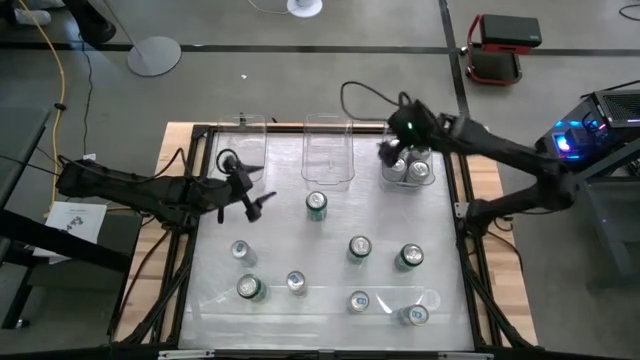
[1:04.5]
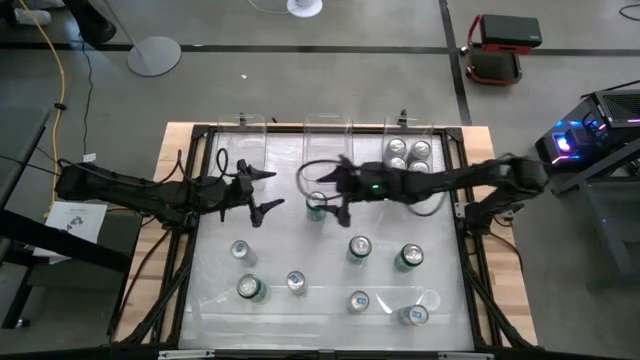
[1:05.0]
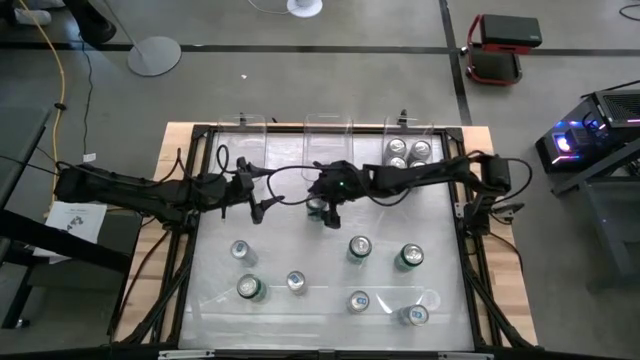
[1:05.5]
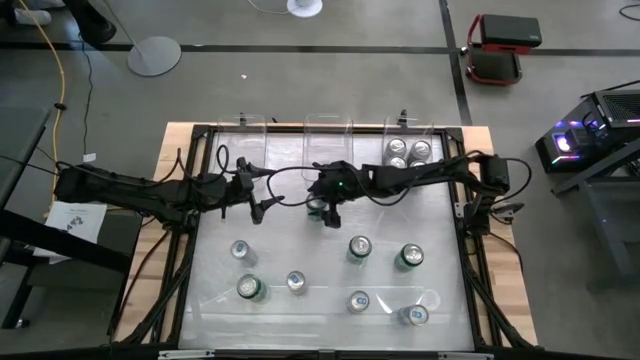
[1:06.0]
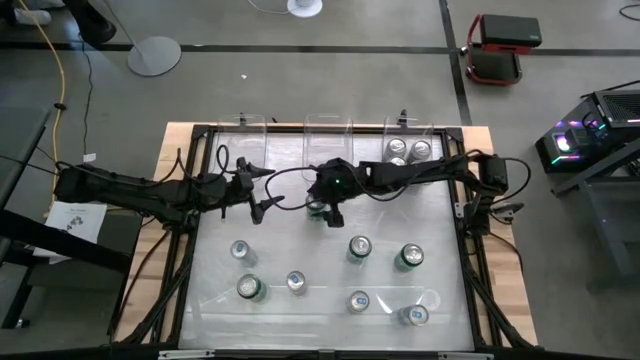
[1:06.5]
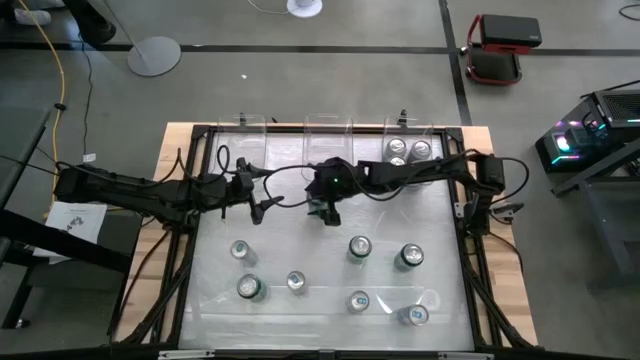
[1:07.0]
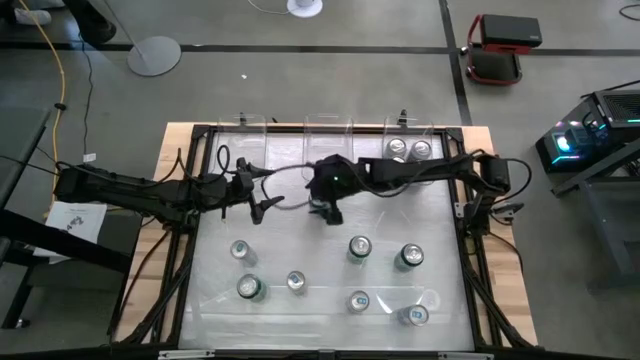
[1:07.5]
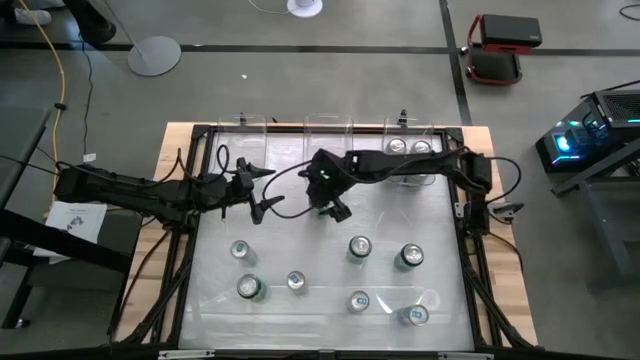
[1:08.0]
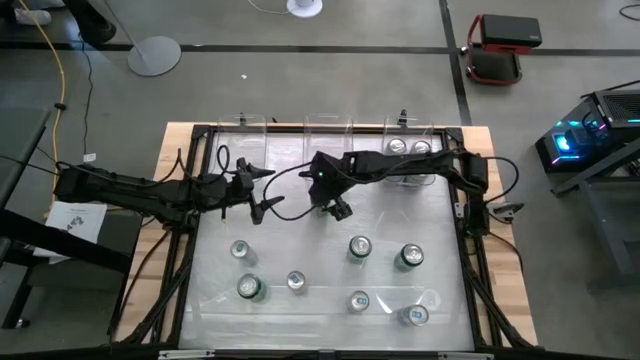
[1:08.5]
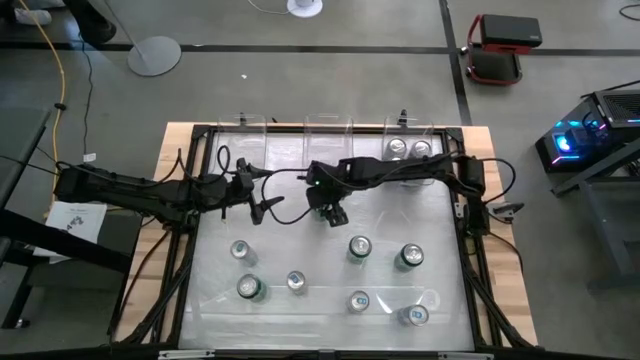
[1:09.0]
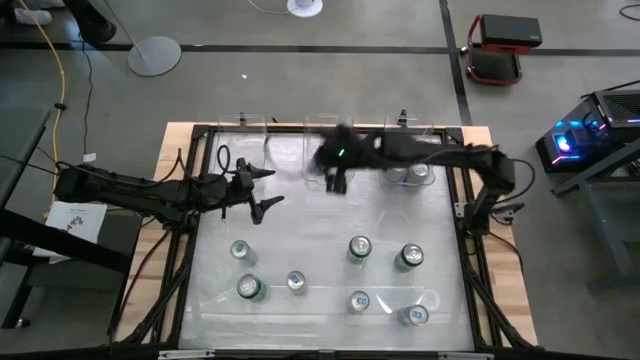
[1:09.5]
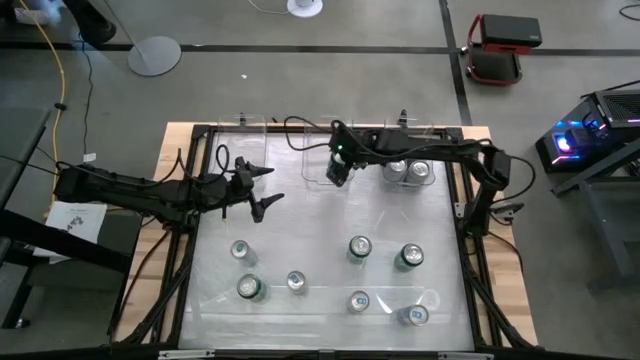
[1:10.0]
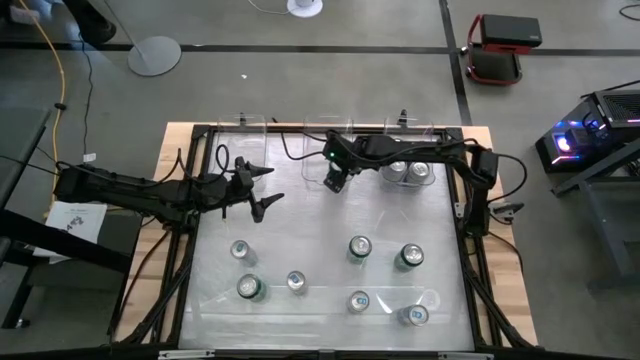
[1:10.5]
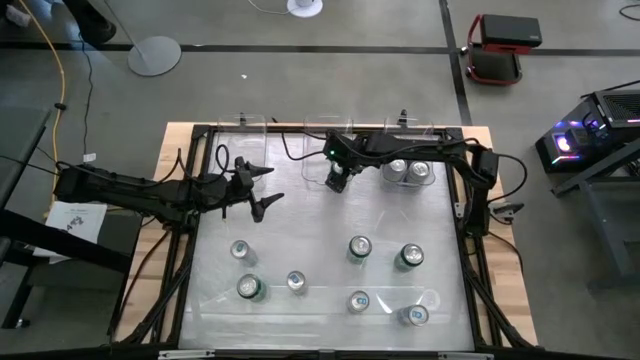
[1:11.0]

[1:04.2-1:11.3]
Task: Sort soda cans
Put the top green soda can into the middle transparent bin

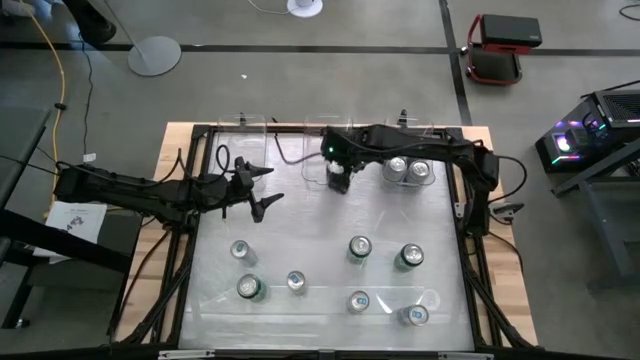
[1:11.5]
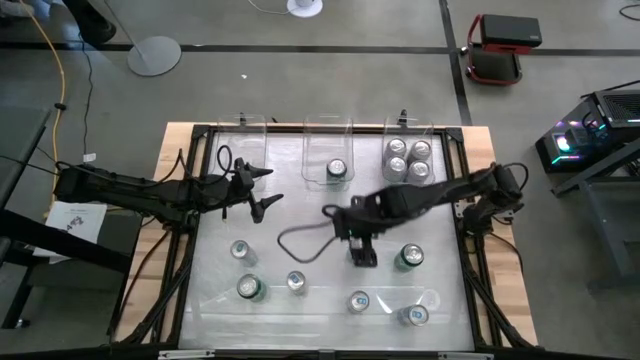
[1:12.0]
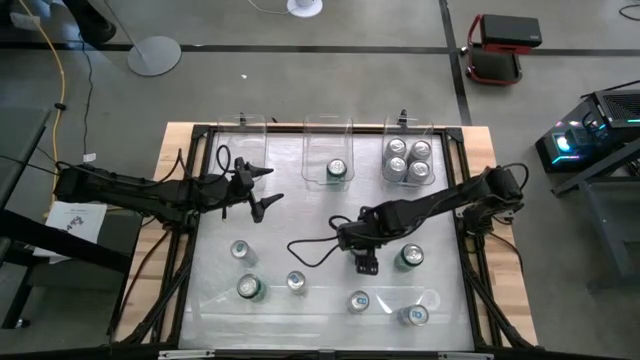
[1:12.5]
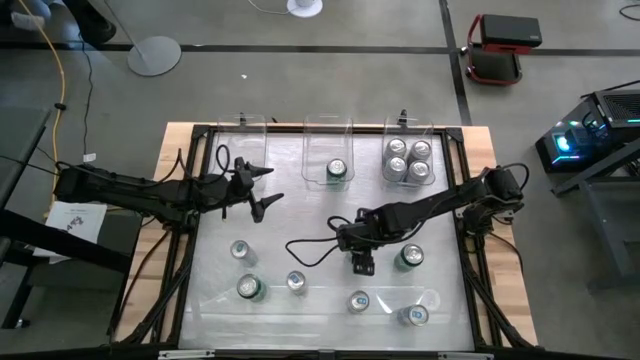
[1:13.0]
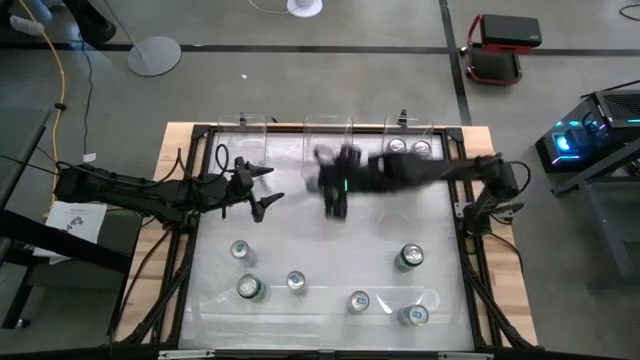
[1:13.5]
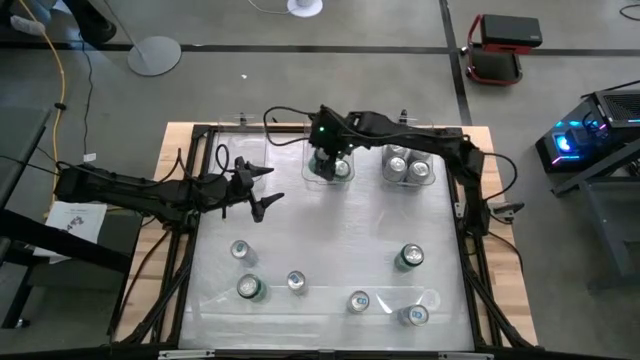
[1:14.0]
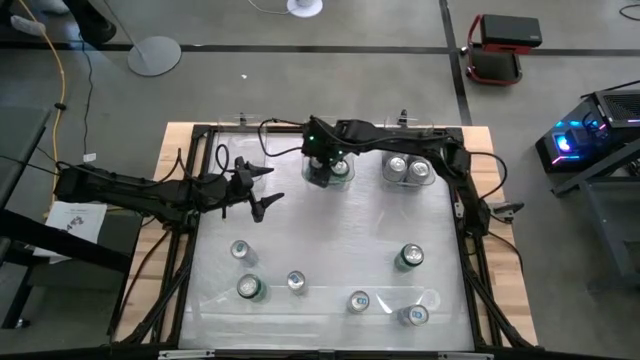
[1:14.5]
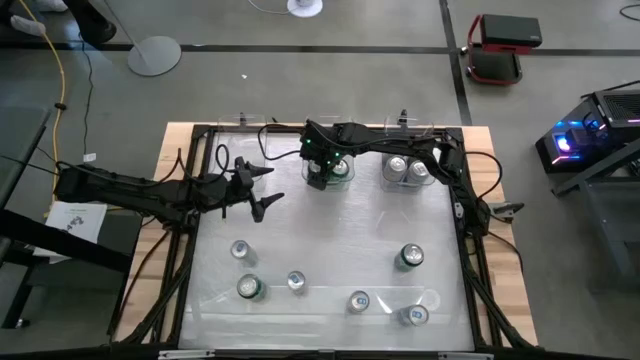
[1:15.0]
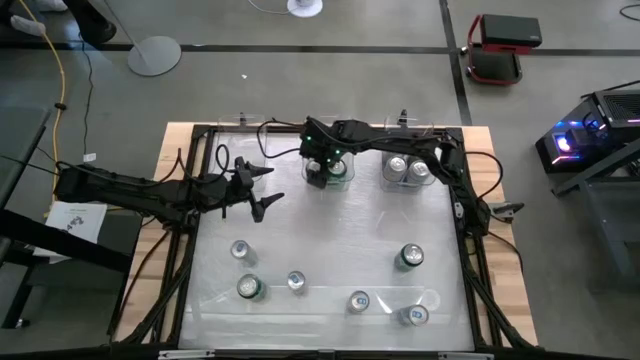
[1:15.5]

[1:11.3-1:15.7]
Put the top left green soda can into the middle transparent bin

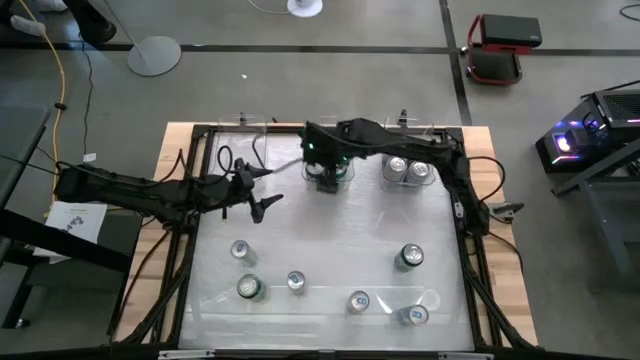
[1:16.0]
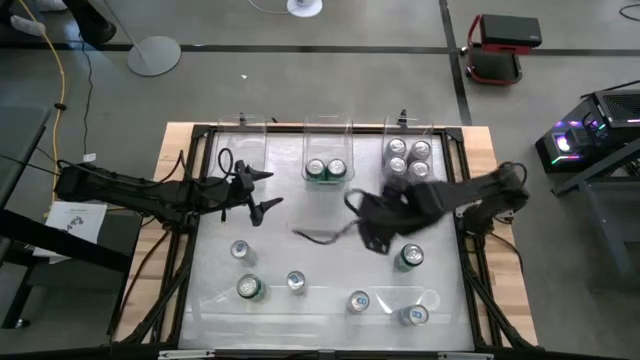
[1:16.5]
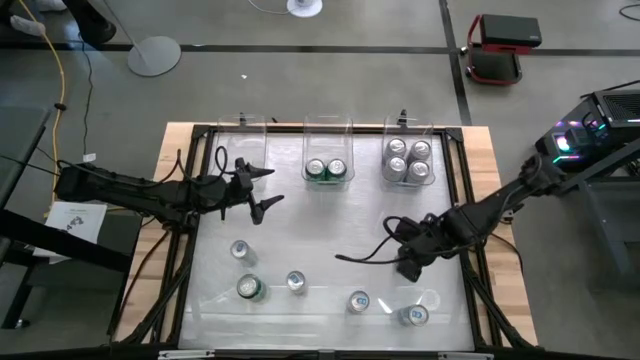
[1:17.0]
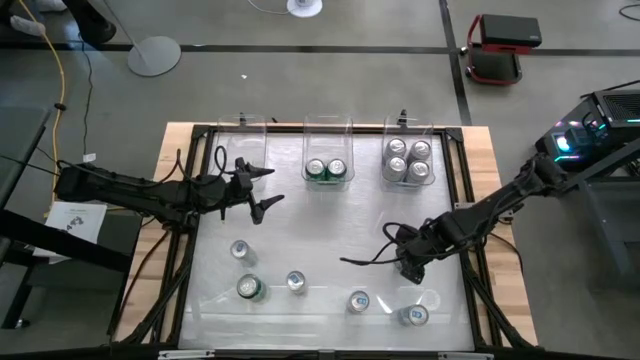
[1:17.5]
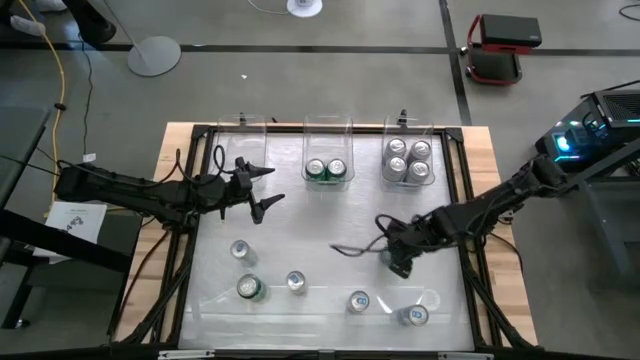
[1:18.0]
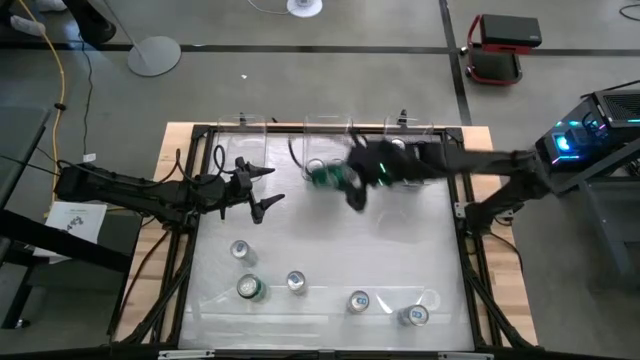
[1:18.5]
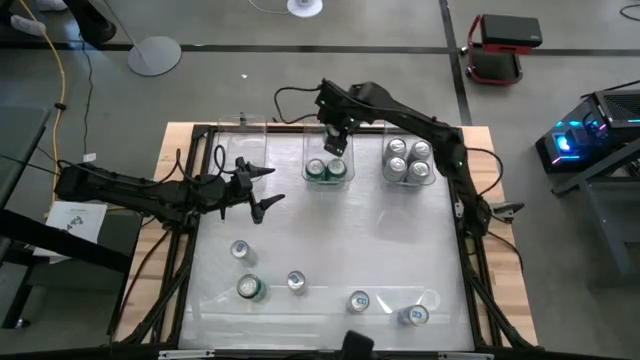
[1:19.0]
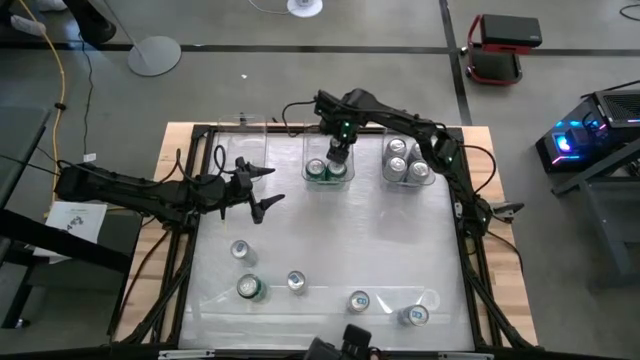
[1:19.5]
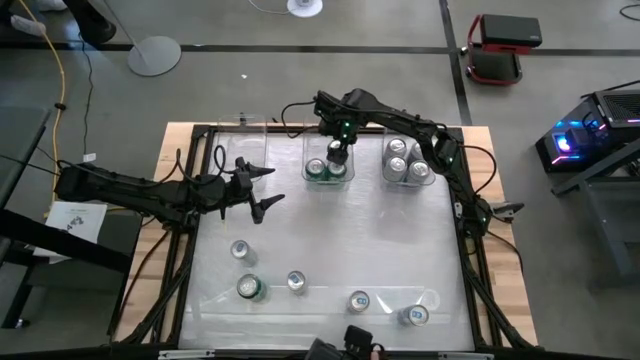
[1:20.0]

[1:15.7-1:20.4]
Put the right green soda can into the middle transparent bin

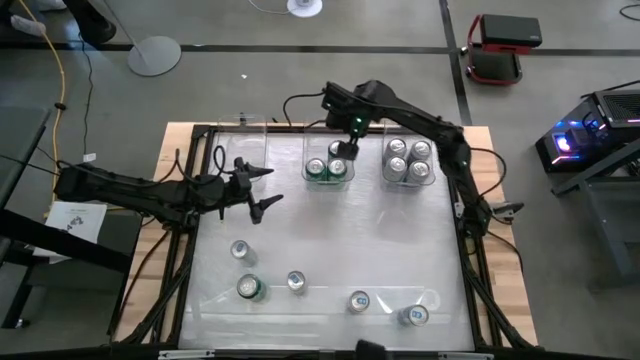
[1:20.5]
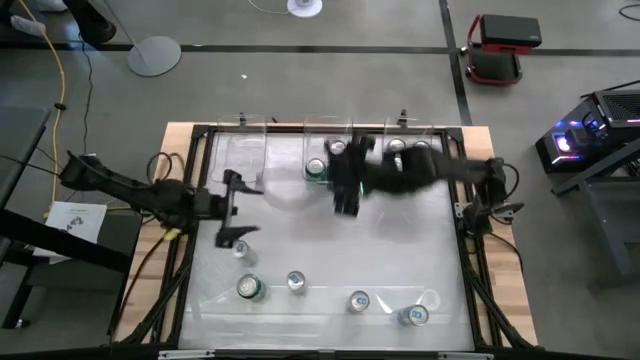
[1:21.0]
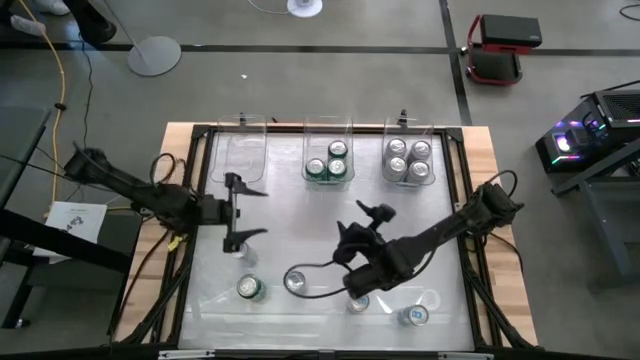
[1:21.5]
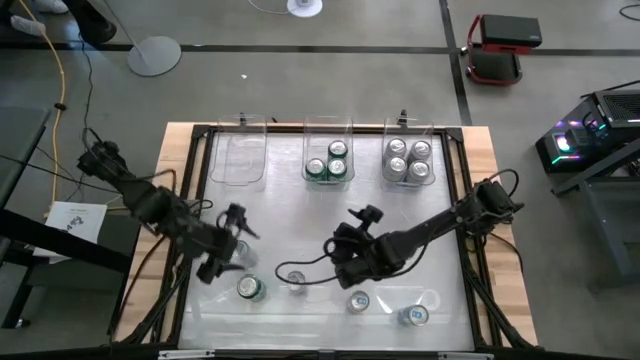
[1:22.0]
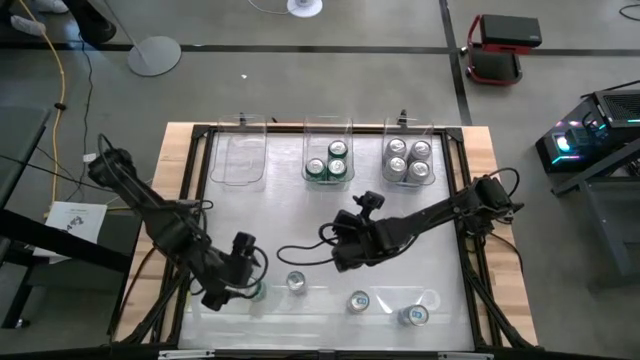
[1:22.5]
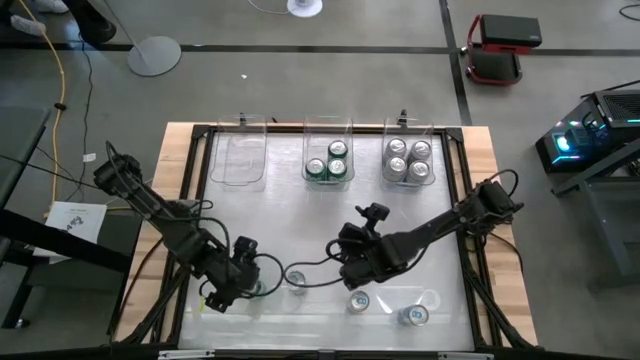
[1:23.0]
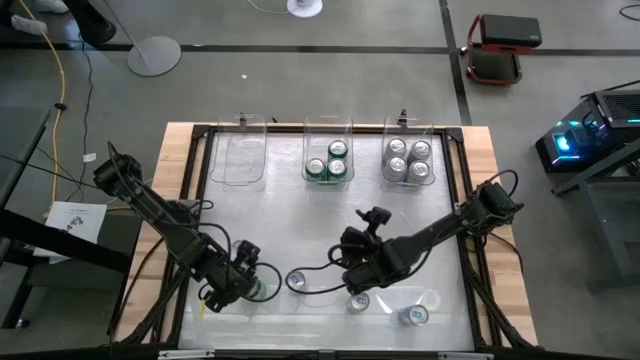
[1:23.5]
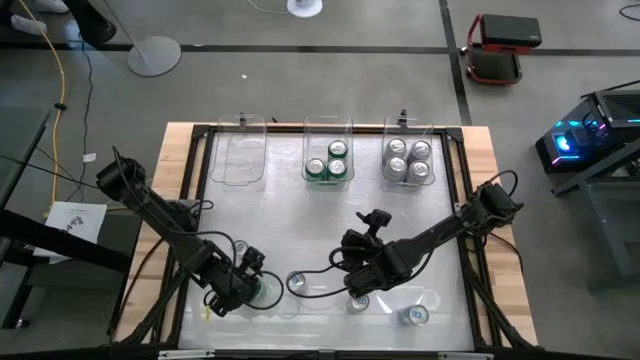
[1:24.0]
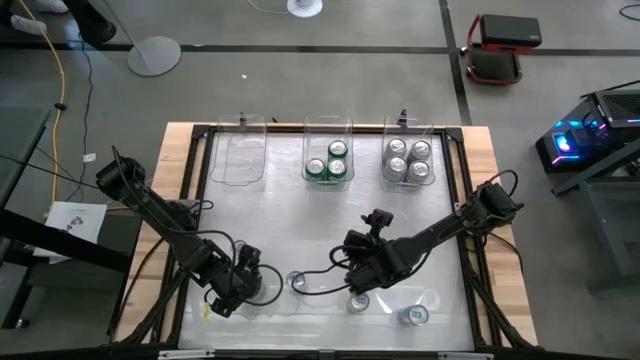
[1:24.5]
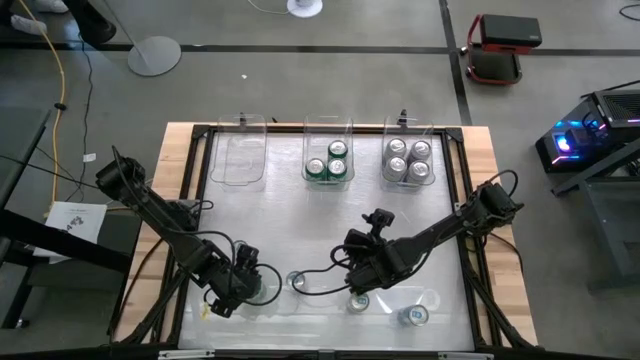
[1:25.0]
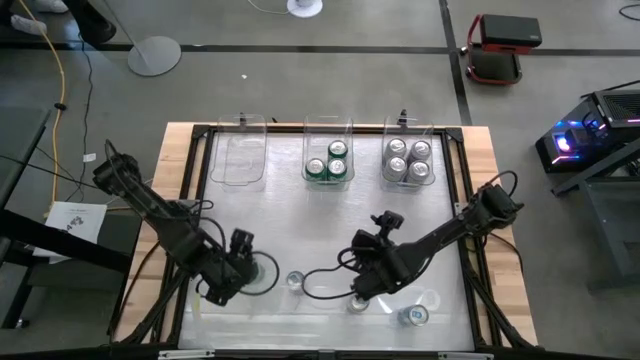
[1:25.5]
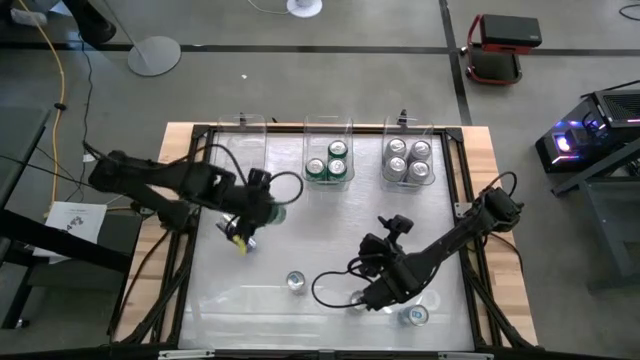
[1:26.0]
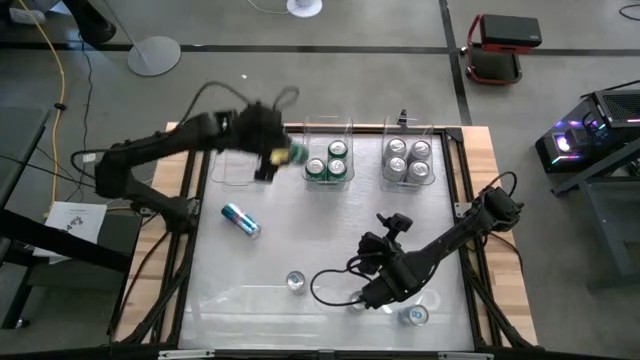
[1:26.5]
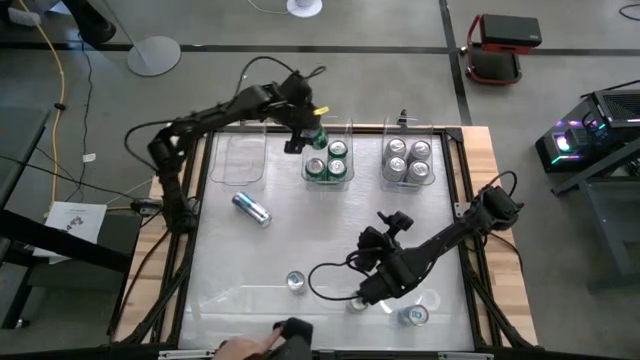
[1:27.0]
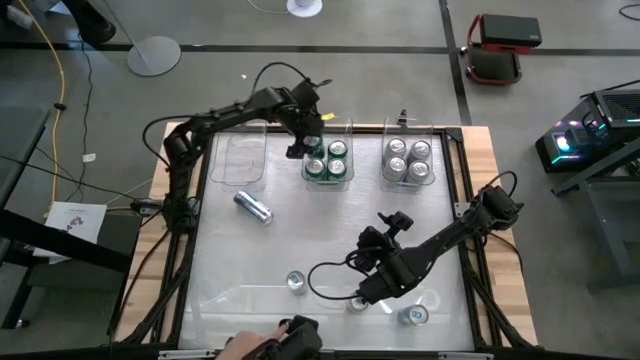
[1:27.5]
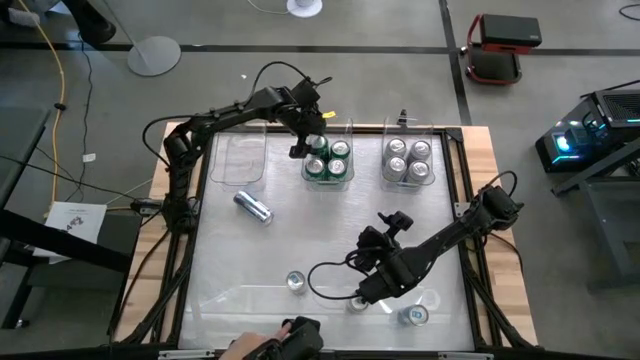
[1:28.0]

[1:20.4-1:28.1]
Put the green soda can into the middle transparent bin
